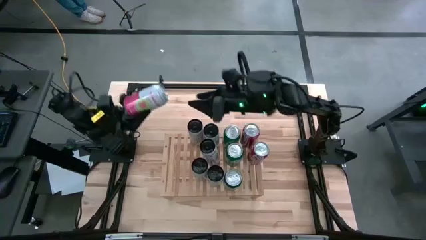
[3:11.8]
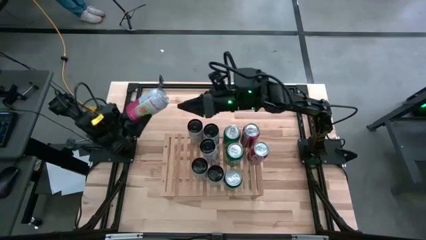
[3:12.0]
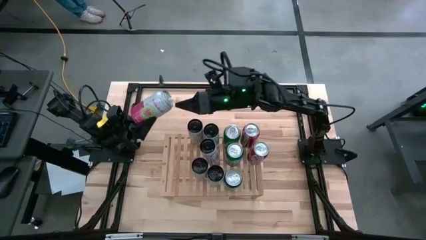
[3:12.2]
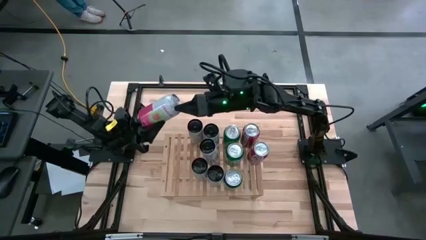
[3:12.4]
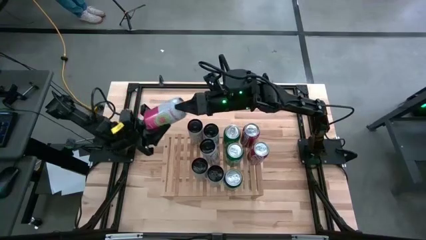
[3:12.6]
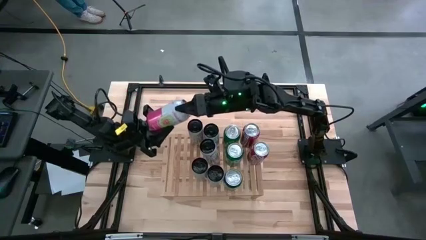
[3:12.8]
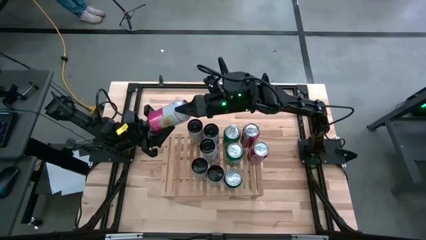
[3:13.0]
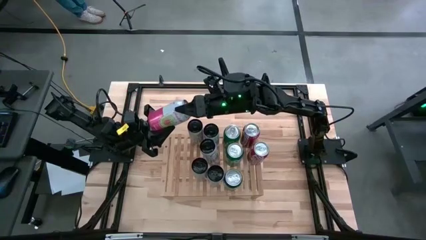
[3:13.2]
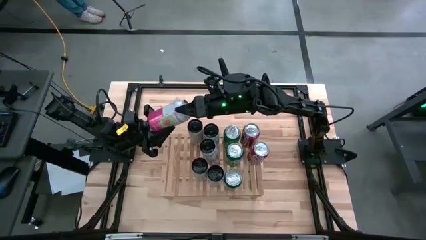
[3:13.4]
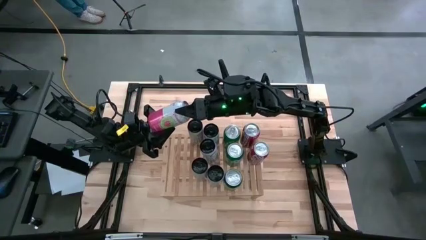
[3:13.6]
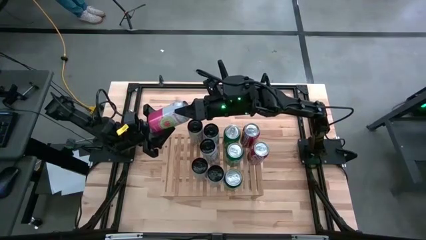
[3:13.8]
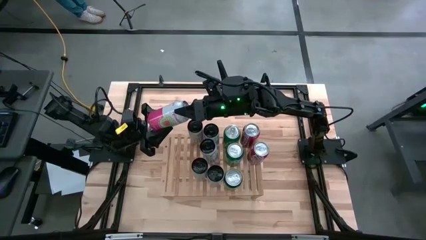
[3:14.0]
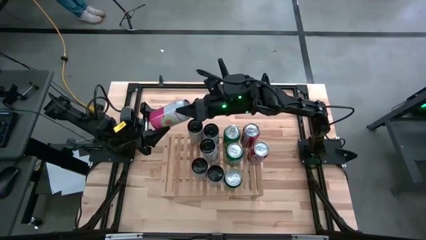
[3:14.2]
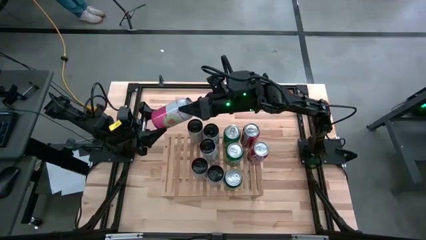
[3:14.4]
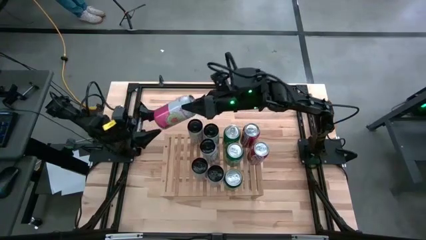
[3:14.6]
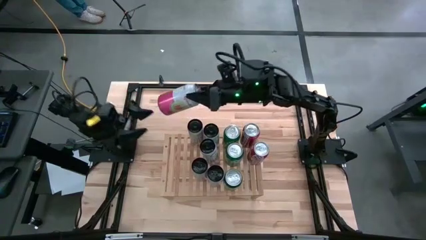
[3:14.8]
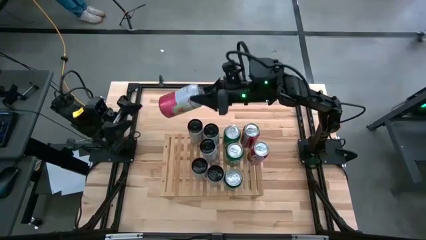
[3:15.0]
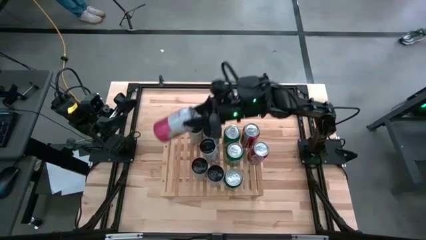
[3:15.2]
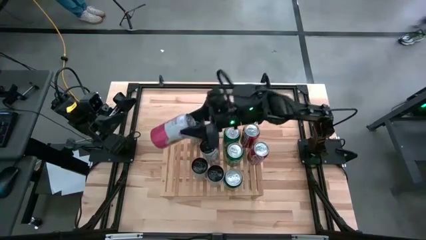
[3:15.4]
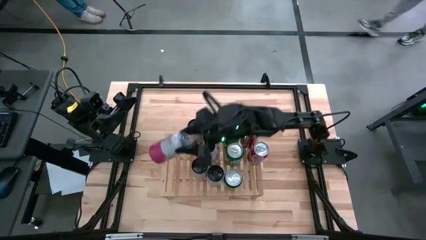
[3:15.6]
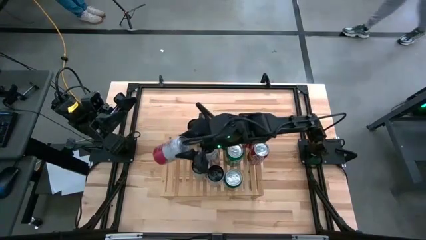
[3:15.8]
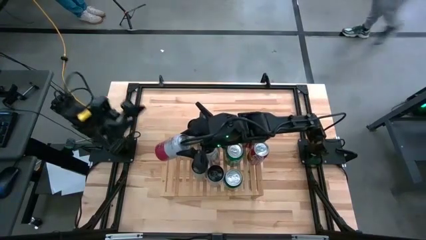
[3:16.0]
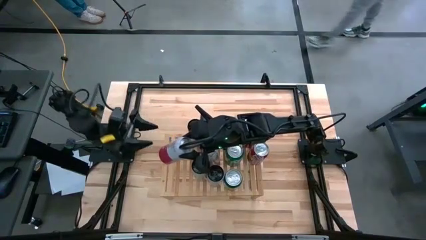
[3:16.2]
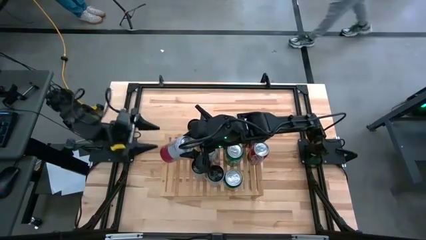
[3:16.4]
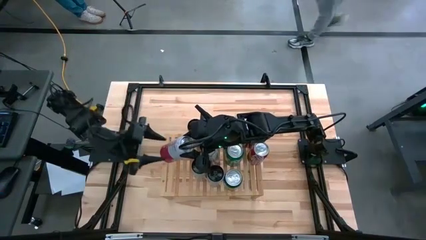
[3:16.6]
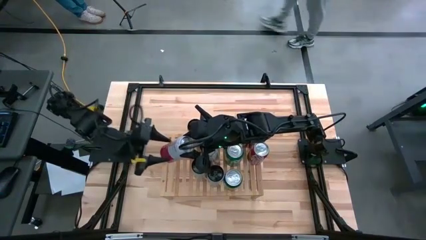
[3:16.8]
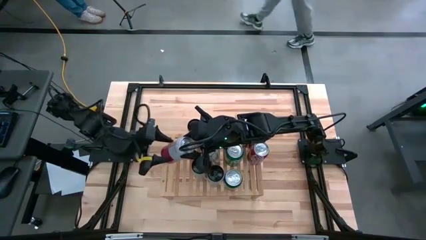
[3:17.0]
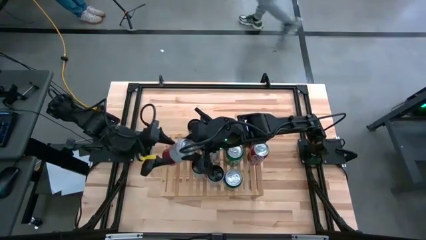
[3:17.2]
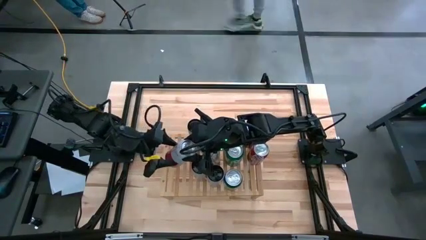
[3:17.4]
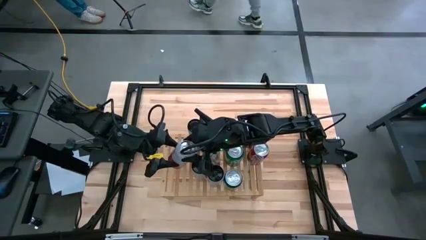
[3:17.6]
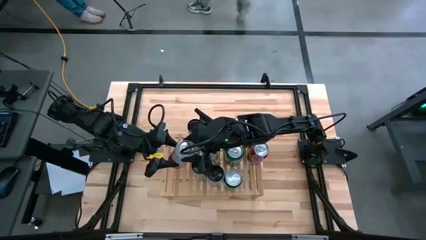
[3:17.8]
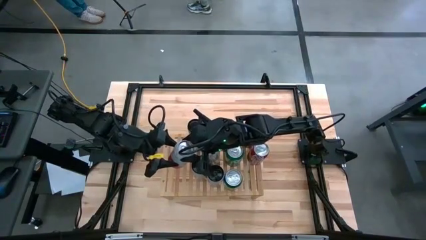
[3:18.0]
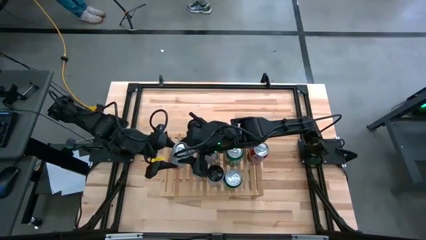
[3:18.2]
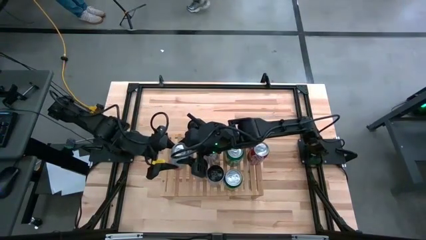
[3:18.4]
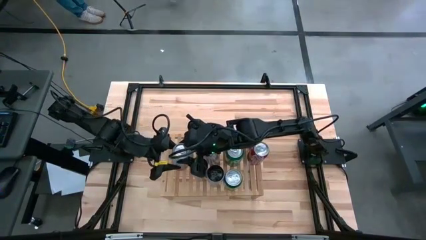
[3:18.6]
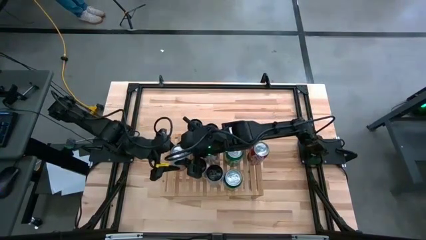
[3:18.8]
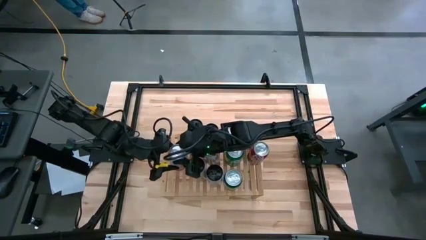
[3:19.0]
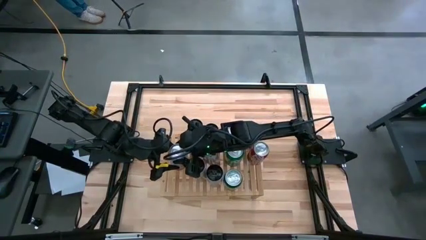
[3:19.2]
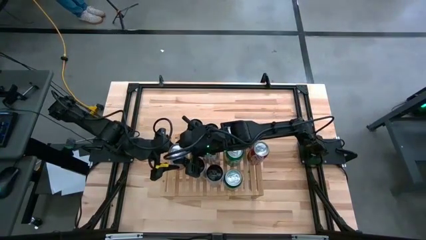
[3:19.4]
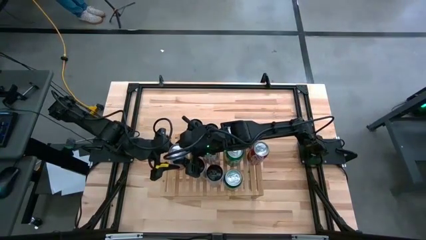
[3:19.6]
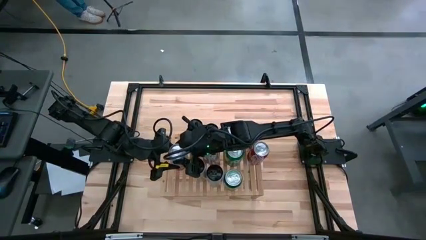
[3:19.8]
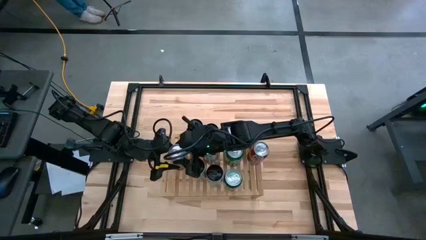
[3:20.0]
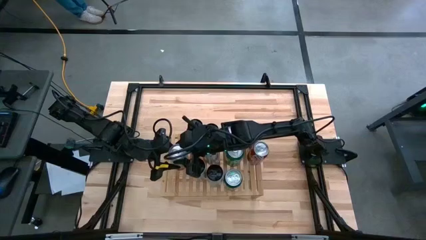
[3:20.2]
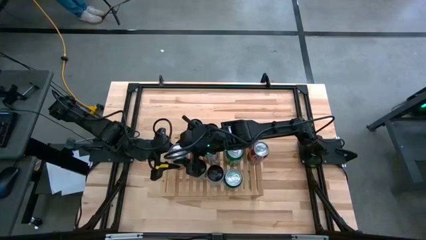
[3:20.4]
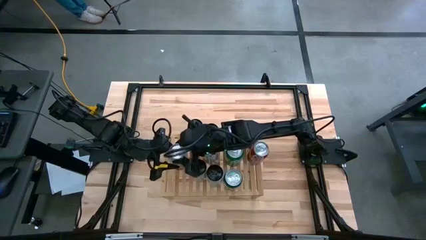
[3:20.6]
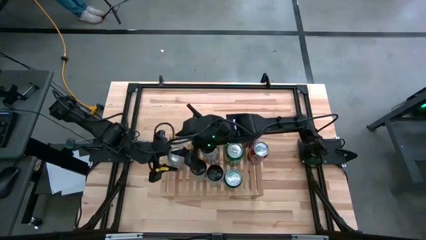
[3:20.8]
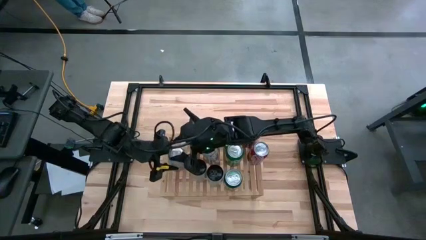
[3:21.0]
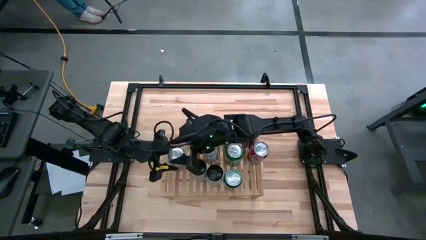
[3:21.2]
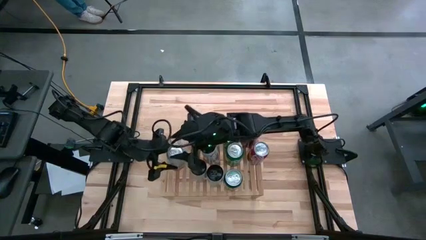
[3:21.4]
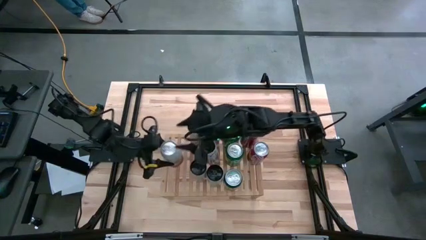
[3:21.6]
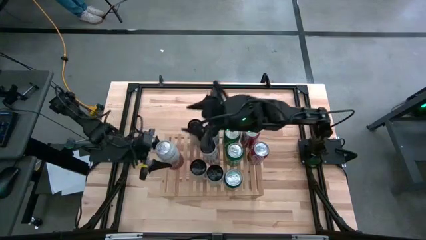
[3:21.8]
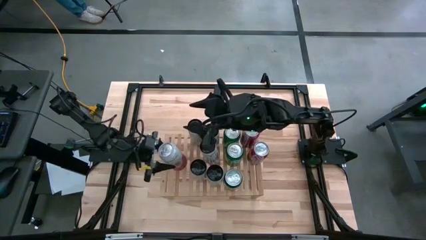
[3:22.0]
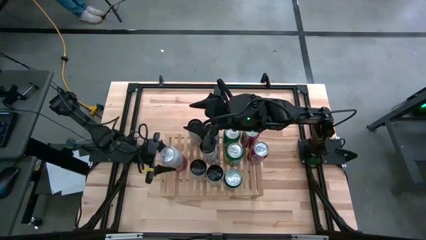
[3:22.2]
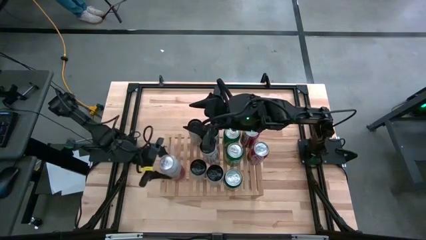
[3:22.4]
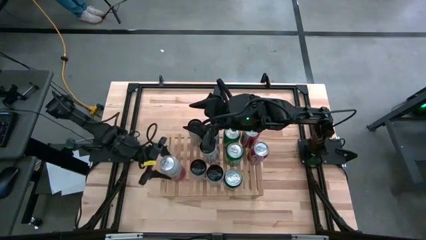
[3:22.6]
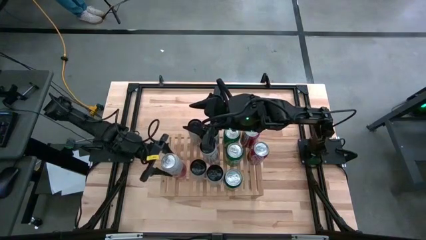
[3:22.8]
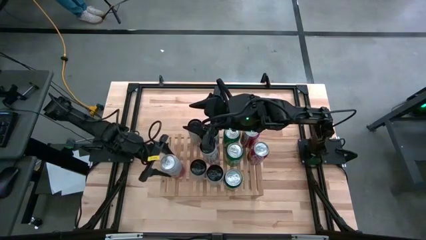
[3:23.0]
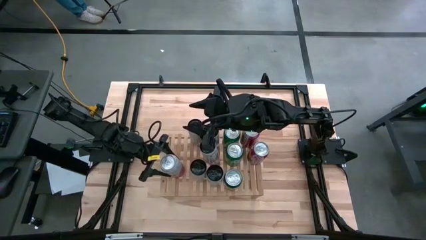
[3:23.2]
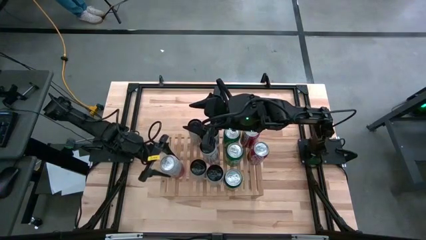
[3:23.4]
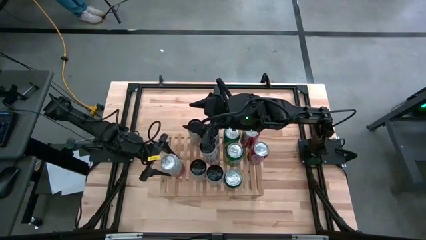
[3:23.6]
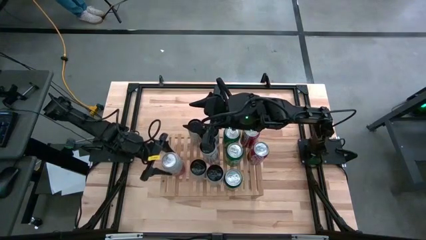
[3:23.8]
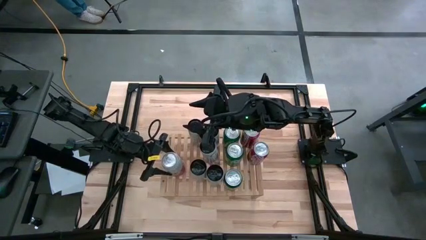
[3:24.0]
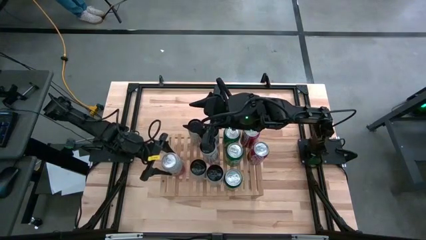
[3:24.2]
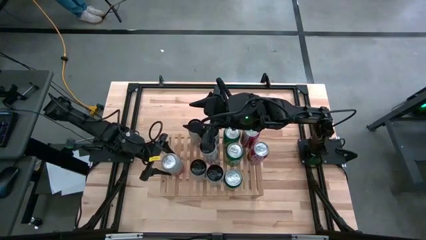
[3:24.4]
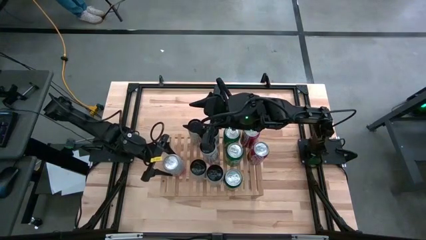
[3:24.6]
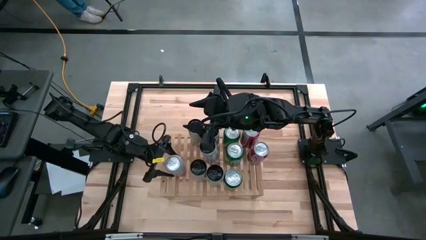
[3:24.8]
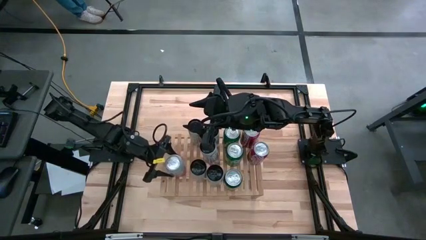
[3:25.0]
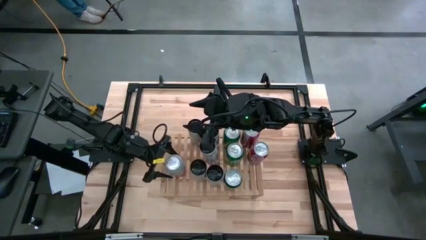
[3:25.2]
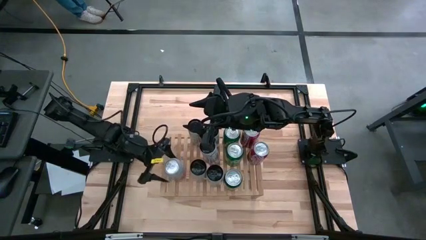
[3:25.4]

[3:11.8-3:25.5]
Task: Place canned beverage on shelf
Put the pink-white soda can on the shelf

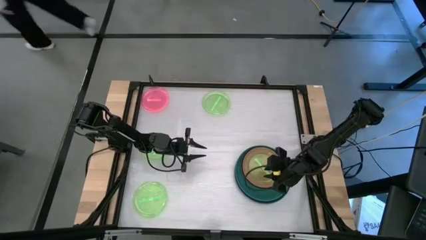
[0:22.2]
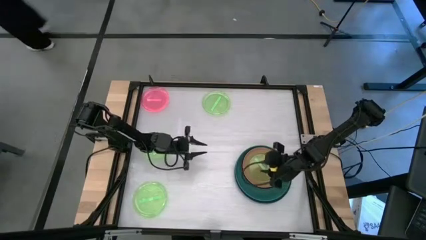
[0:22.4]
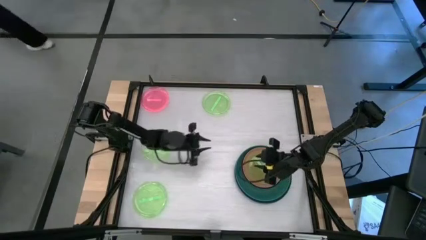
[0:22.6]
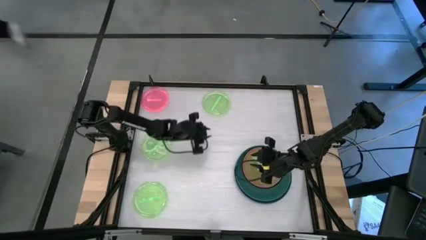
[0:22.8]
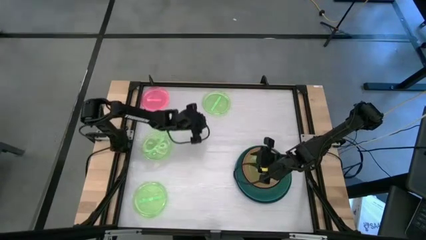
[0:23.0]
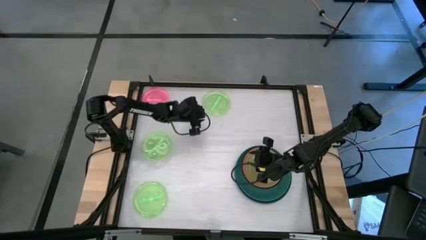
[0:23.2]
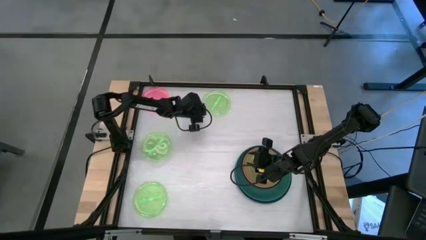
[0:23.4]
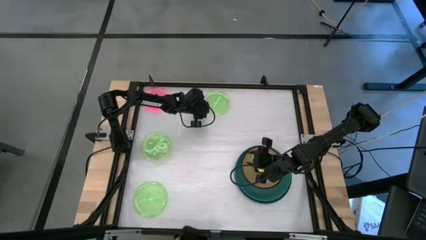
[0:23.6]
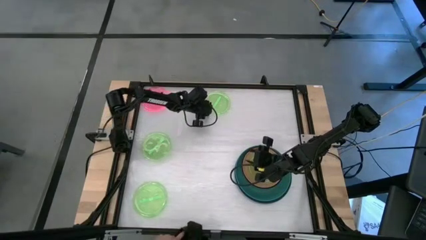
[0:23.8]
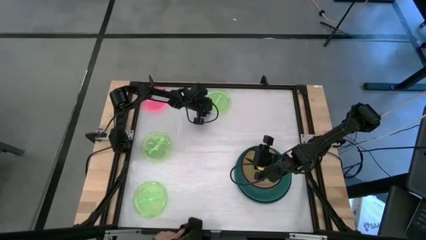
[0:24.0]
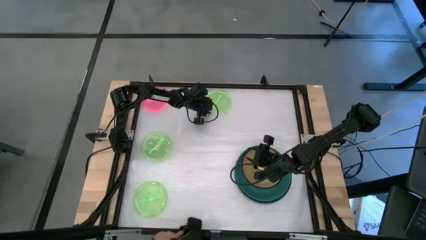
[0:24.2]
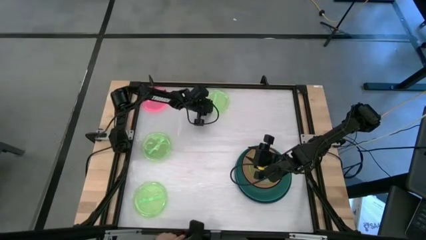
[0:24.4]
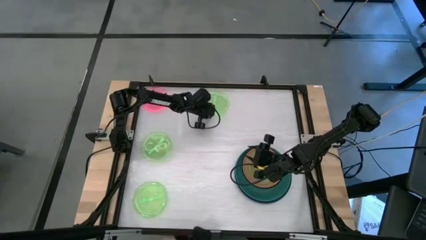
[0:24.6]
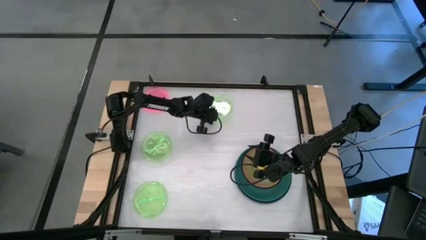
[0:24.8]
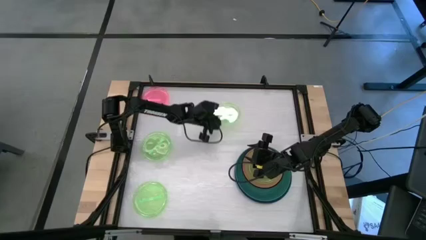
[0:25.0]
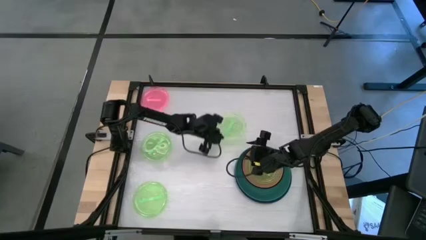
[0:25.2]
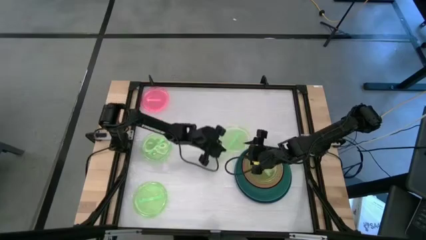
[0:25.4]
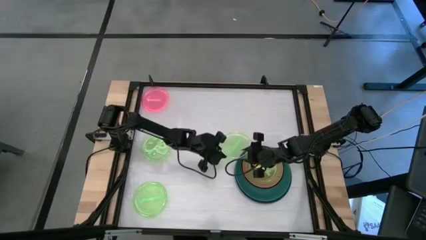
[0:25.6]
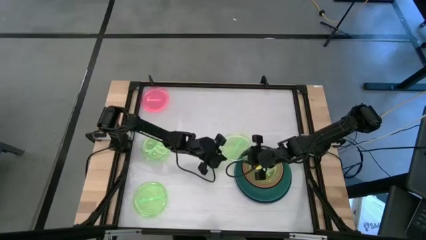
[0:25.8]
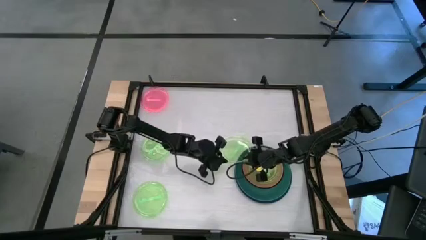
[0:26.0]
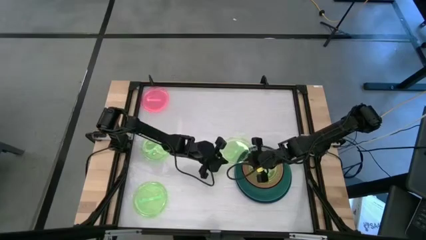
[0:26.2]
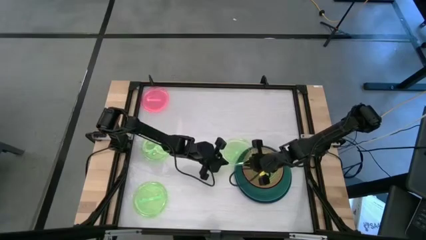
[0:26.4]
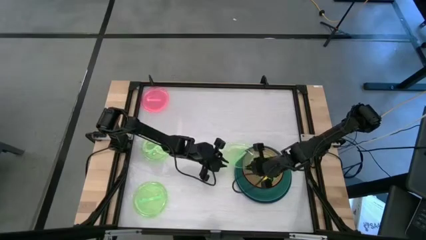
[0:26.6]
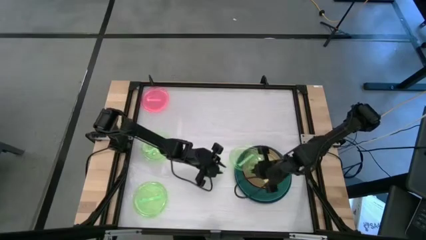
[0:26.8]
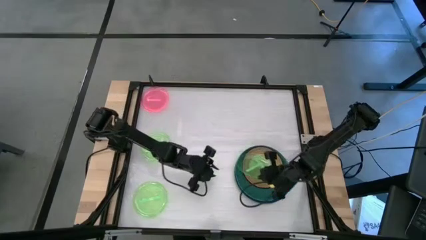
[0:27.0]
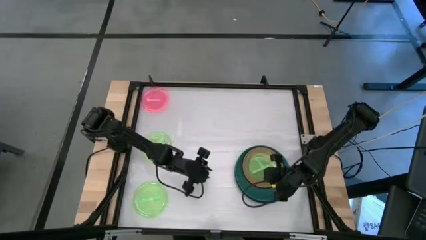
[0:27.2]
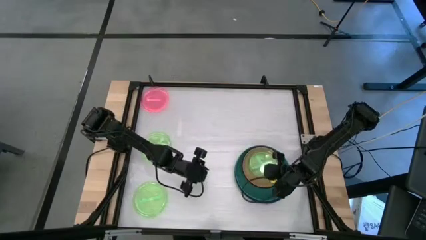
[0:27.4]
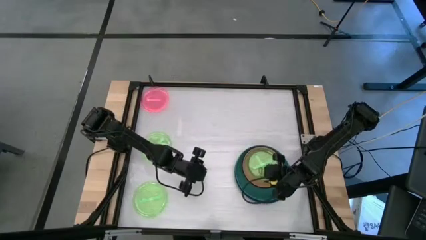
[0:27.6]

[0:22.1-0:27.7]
Task: Stack plastic plates
Stack the light green plate on top of the light green plate
